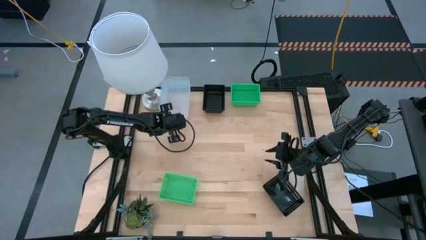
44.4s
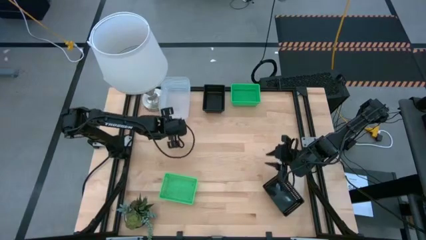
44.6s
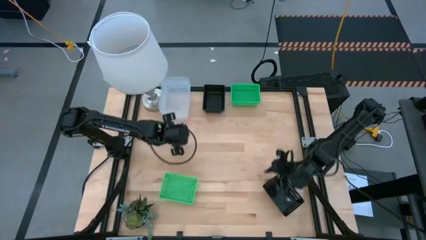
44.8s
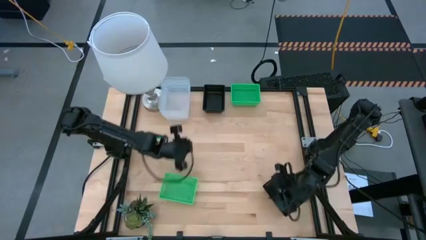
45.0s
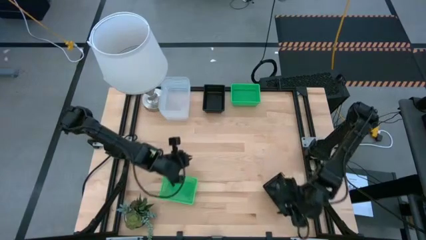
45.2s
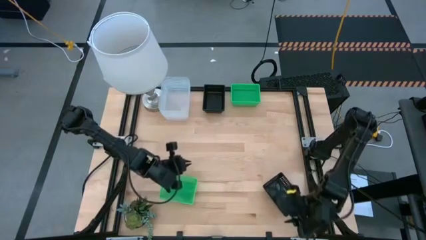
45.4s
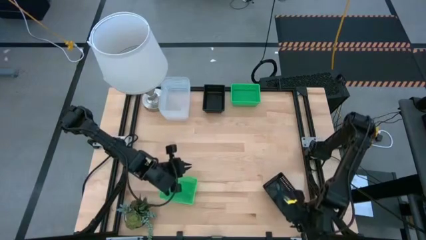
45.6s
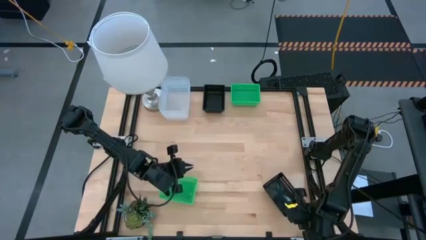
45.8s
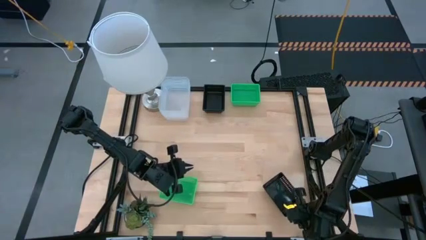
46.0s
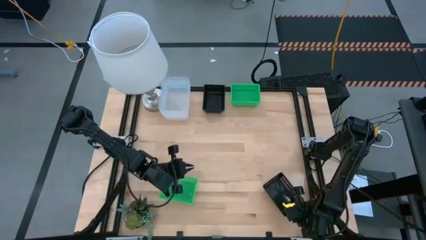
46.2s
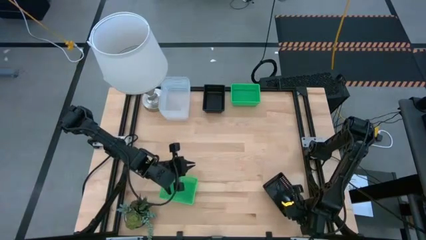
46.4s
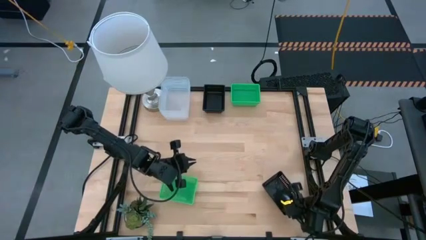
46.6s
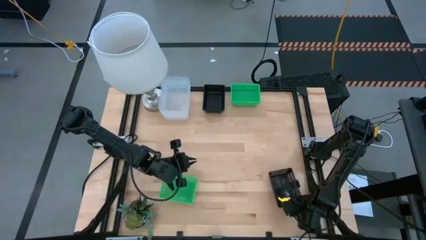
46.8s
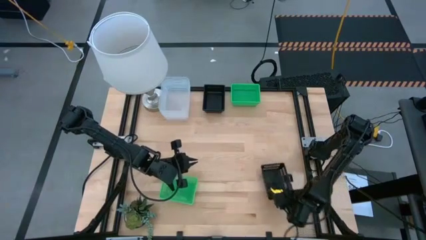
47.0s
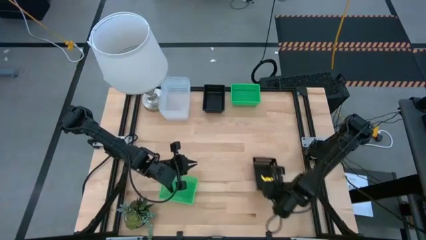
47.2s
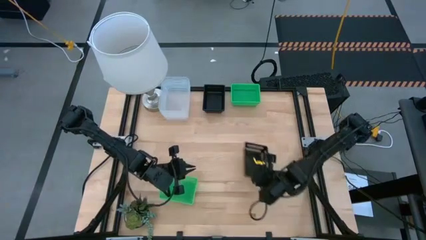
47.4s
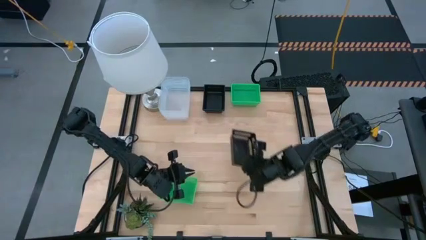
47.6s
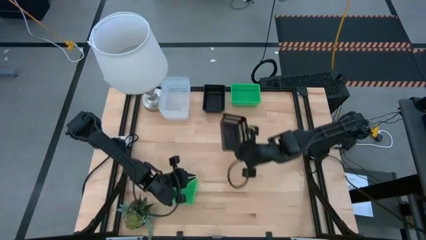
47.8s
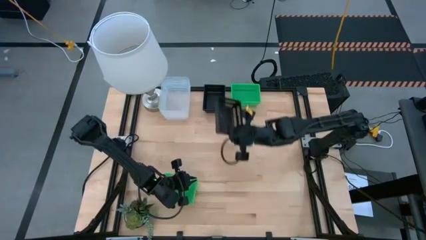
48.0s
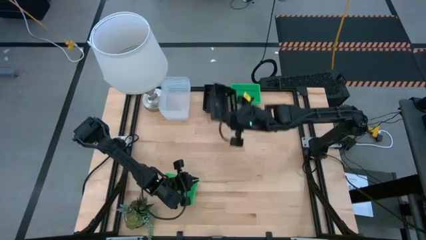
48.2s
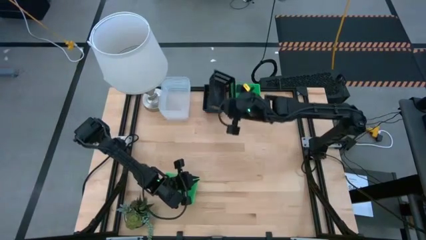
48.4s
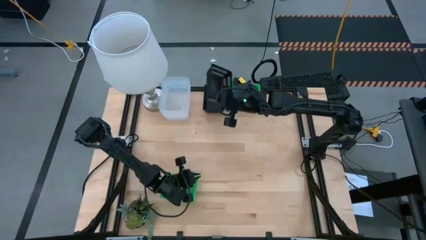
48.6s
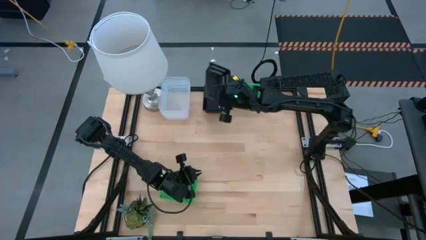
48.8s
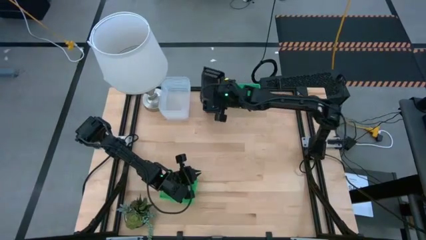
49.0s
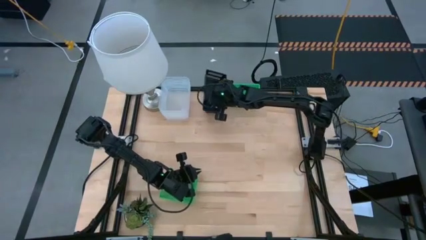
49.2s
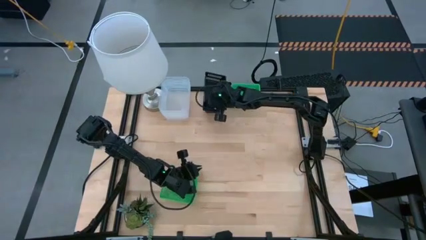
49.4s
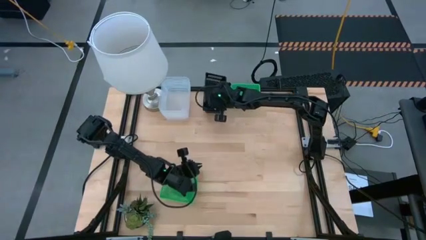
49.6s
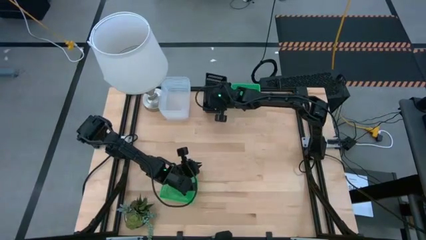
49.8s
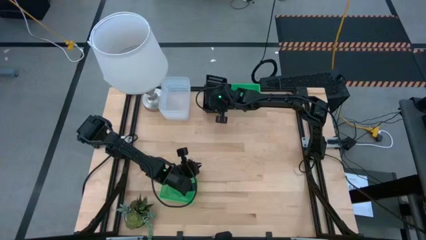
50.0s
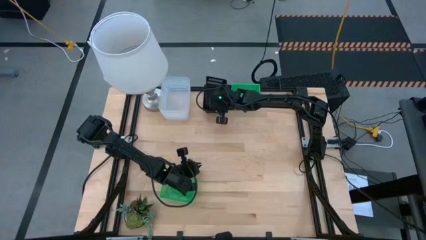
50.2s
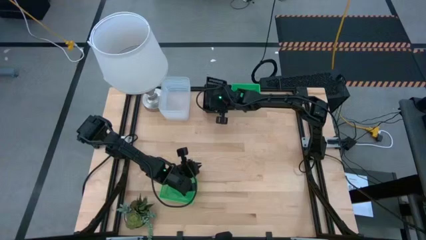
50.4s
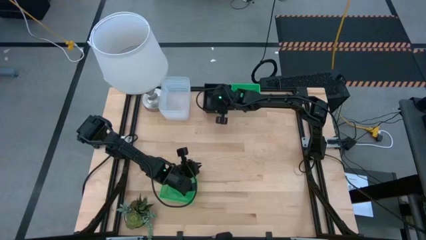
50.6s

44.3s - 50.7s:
Stack the black bin on the top stacked black bins

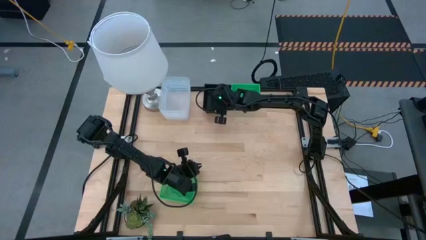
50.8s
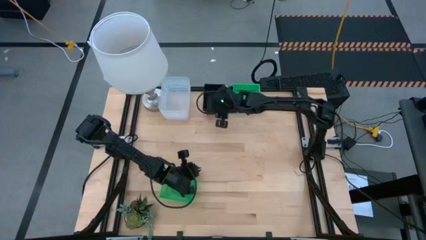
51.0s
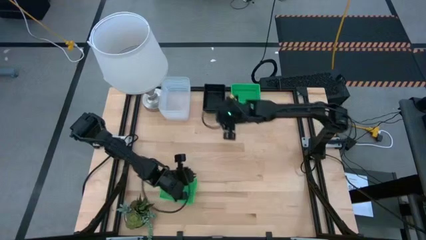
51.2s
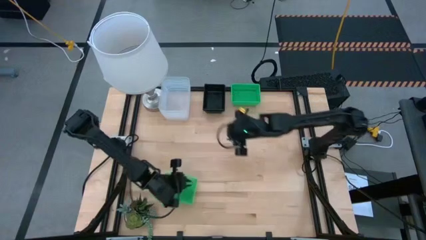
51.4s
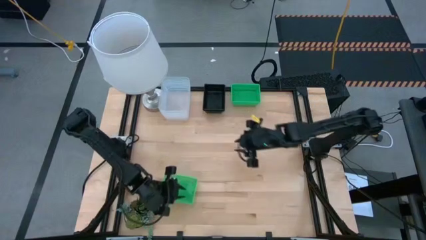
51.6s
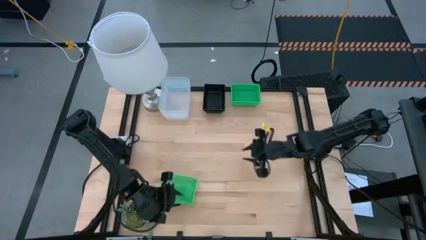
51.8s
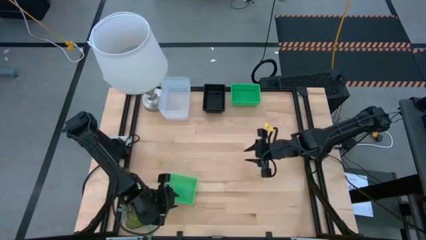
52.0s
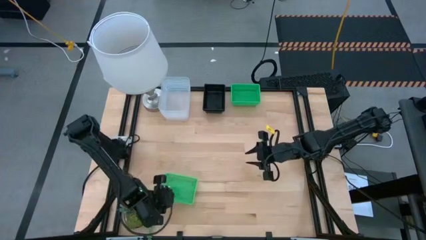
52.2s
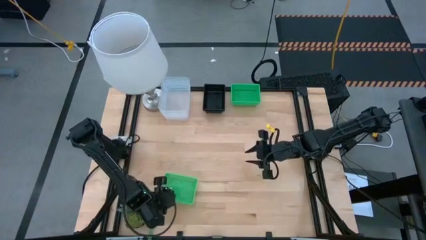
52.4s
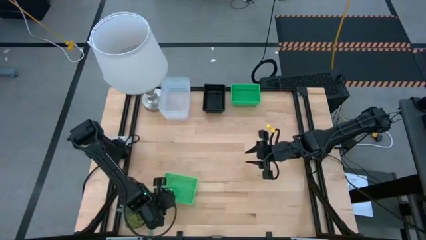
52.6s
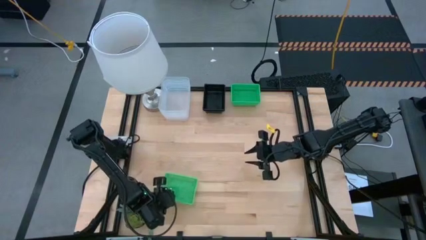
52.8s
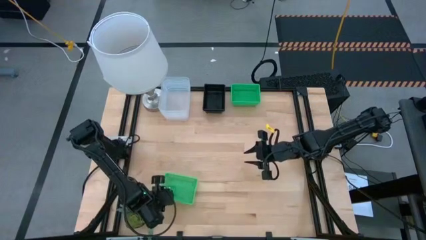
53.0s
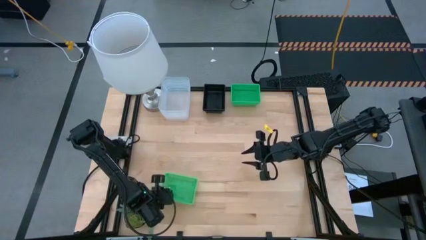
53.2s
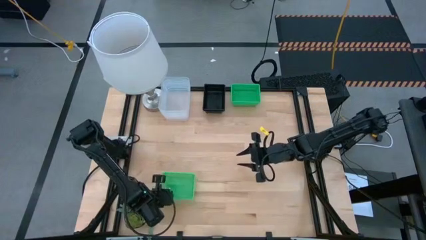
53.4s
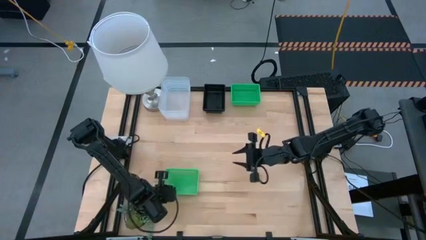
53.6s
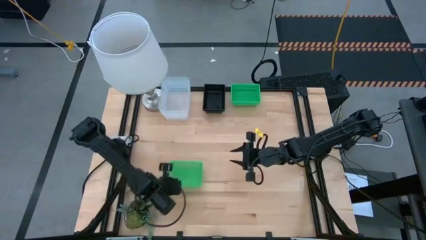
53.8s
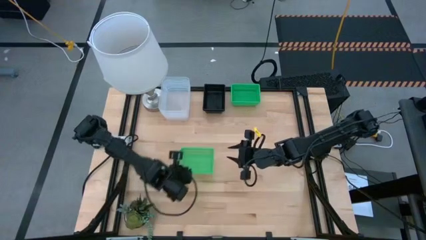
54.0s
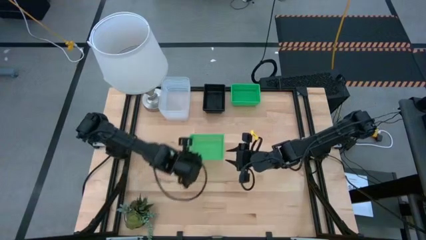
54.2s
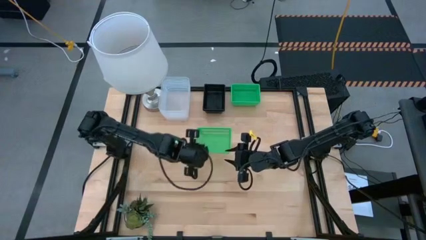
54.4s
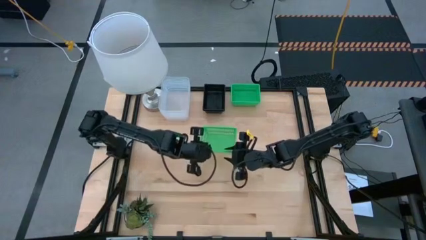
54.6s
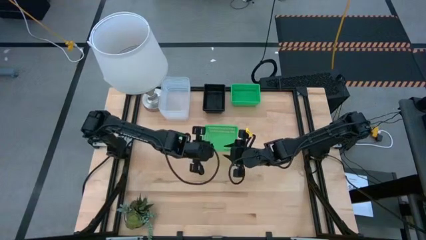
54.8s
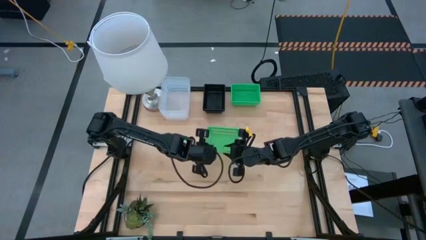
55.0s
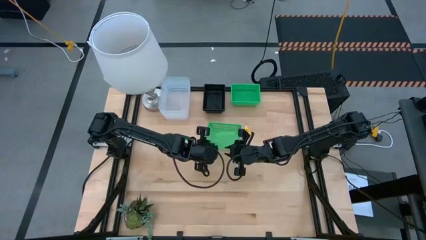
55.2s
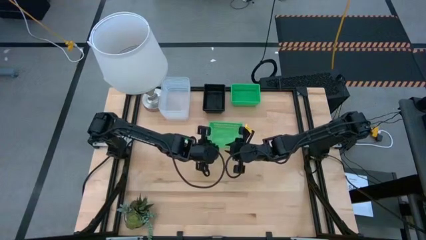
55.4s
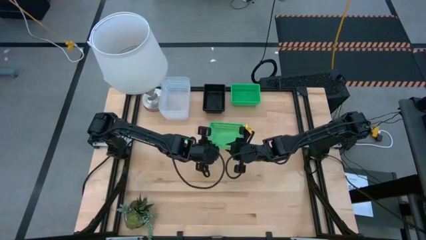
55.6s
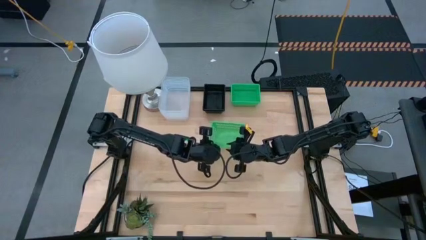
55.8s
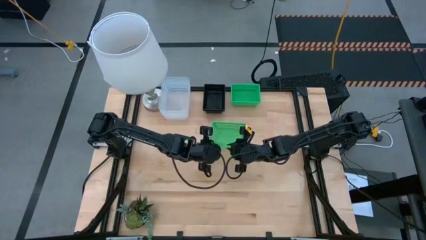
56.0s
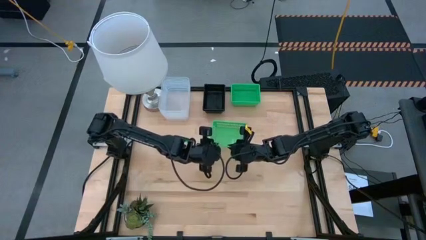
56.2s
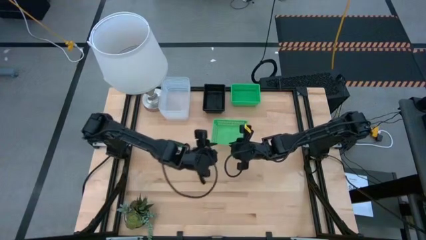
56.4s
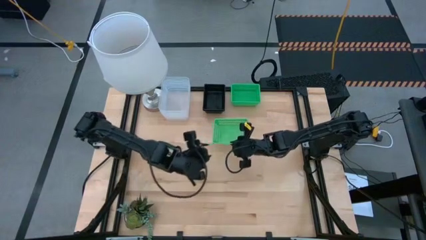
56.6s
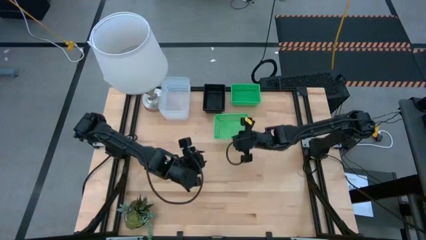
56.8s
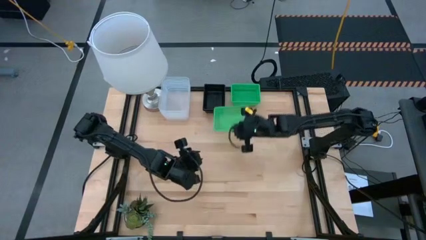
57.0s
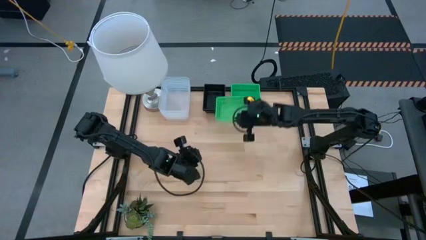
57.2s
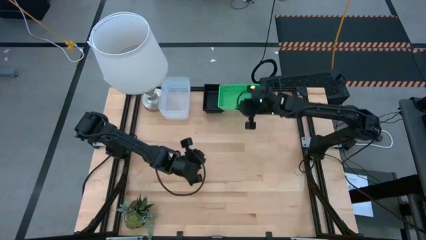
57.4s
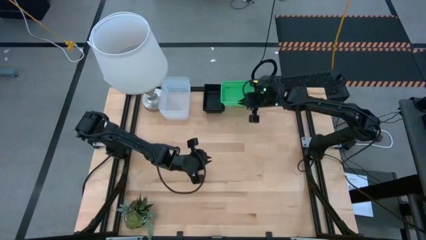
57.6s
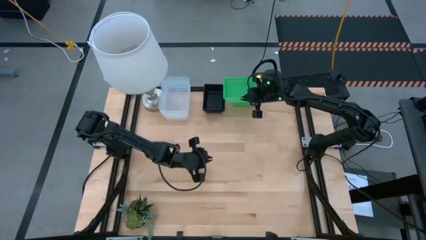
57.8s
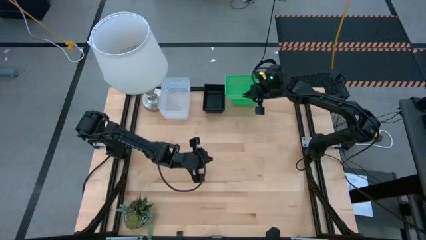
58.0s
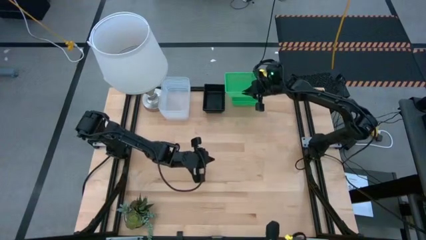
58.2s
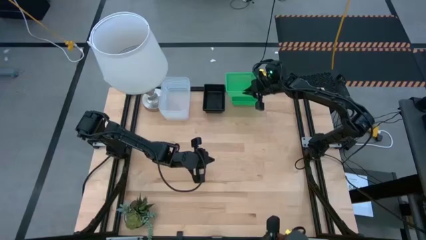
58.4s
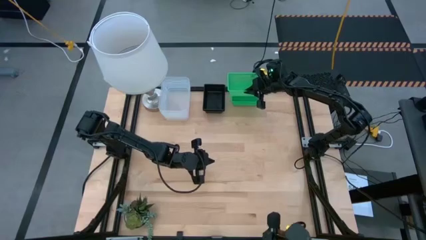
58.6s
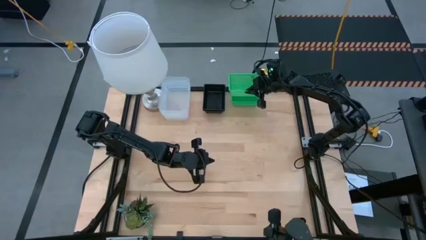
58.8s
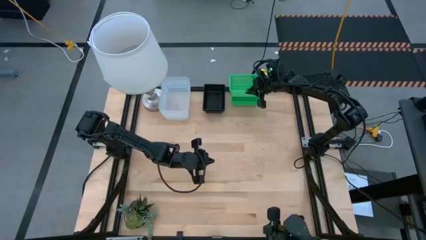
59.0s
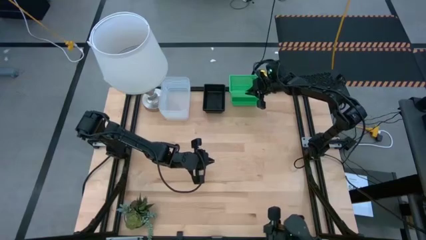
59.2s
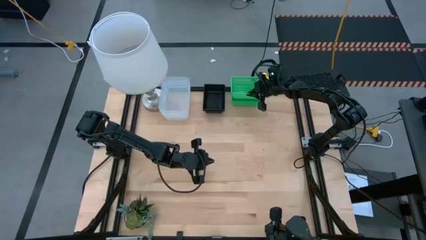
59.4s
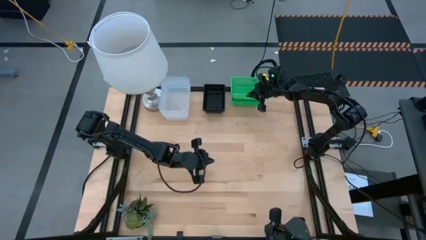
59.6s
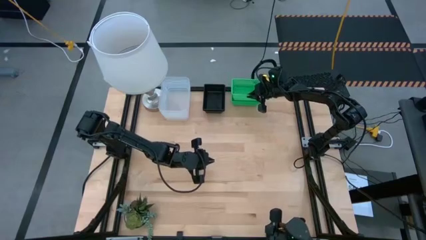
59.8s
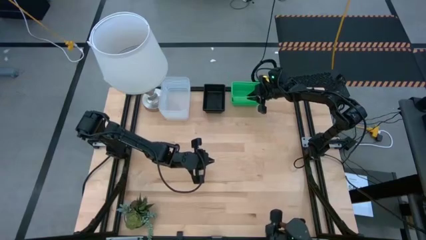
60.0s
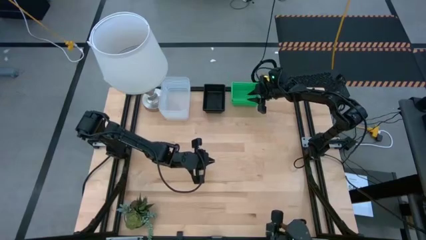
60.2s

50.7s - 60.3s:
Stack the green bin on the top stacked green bins
